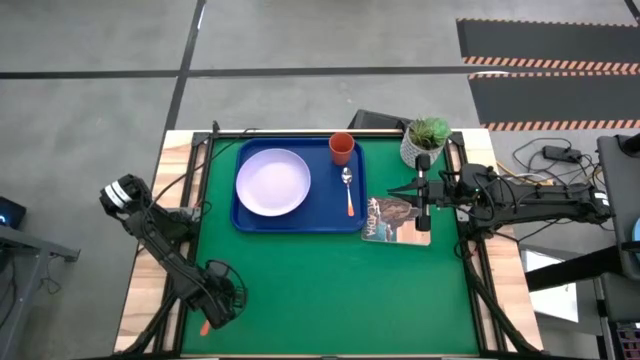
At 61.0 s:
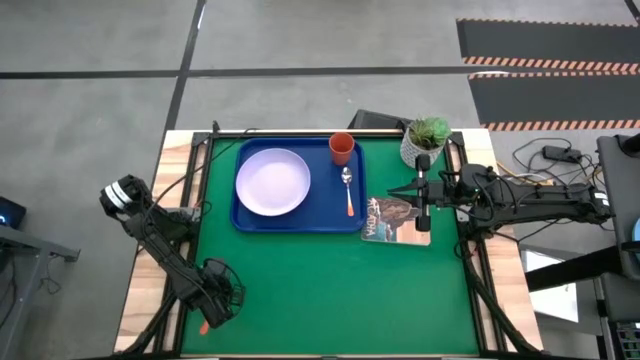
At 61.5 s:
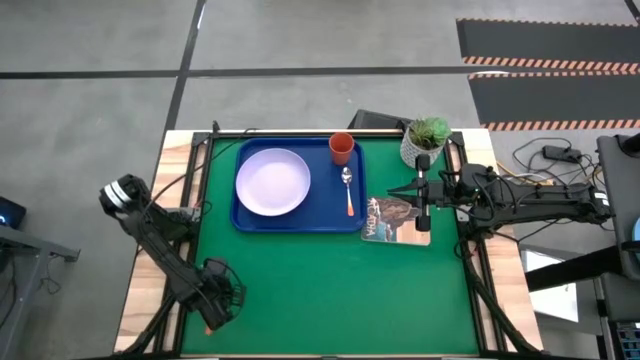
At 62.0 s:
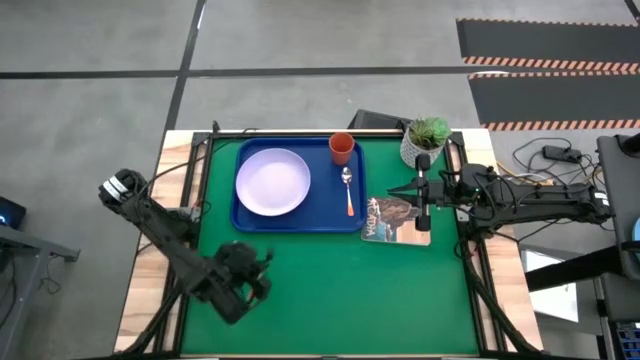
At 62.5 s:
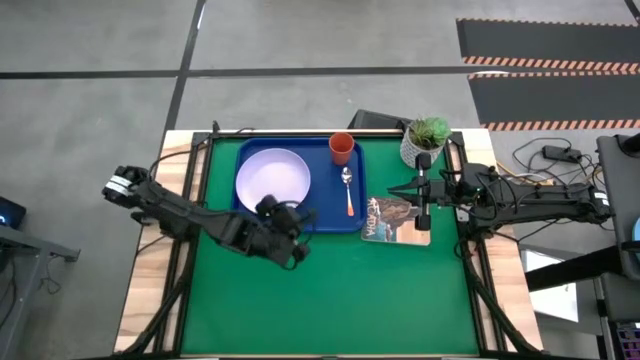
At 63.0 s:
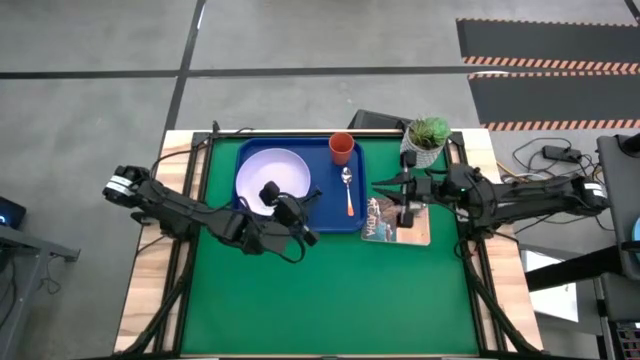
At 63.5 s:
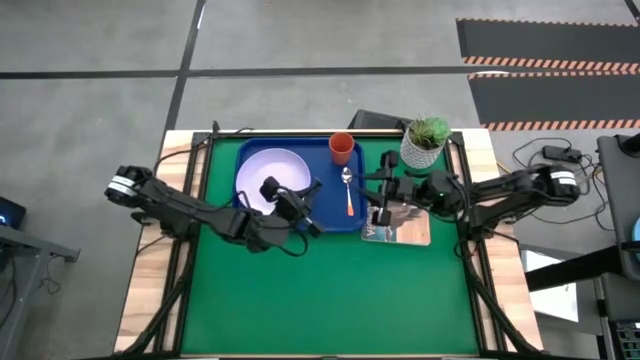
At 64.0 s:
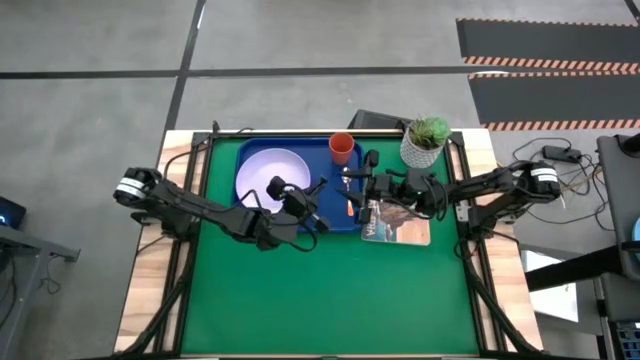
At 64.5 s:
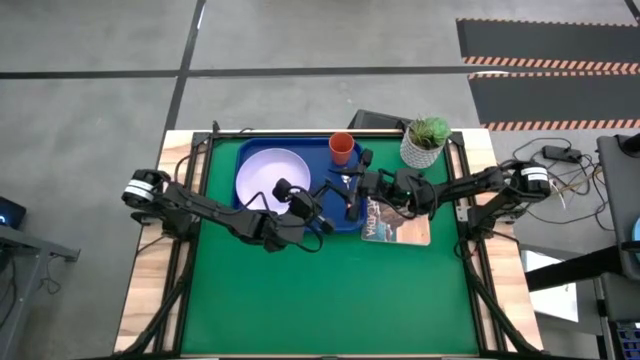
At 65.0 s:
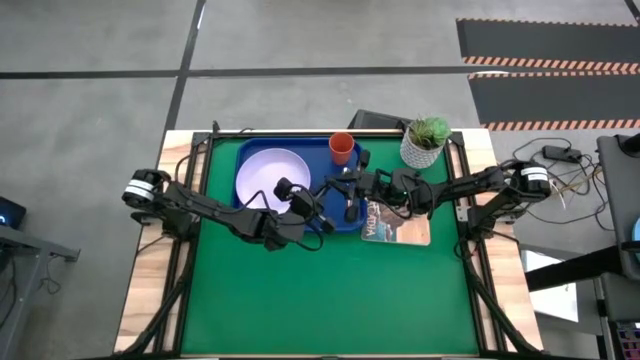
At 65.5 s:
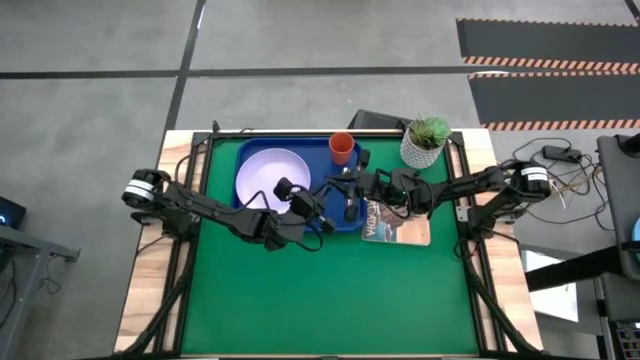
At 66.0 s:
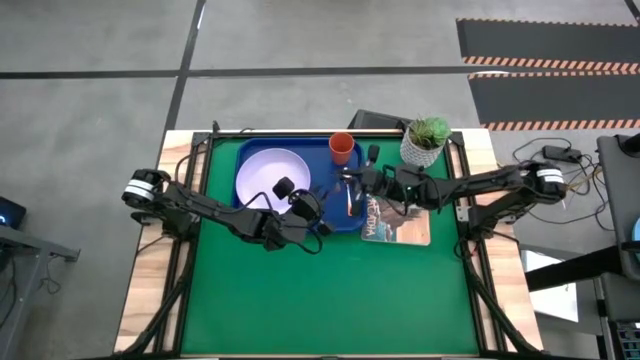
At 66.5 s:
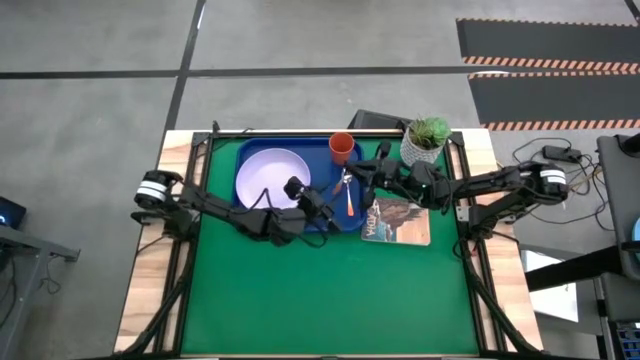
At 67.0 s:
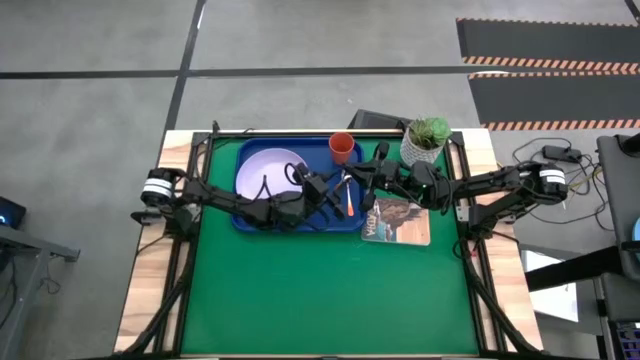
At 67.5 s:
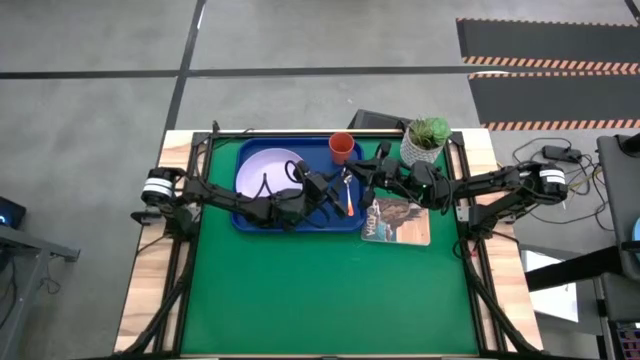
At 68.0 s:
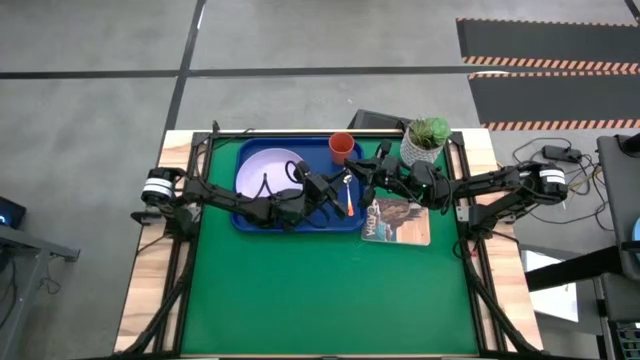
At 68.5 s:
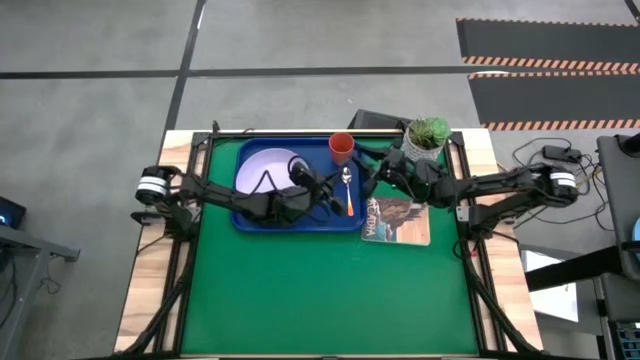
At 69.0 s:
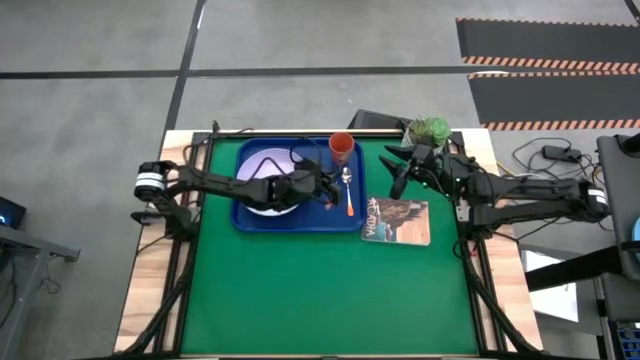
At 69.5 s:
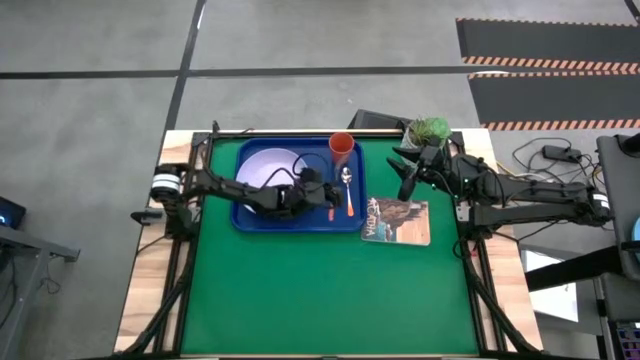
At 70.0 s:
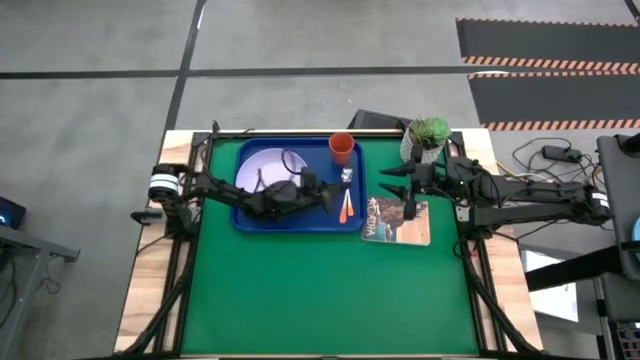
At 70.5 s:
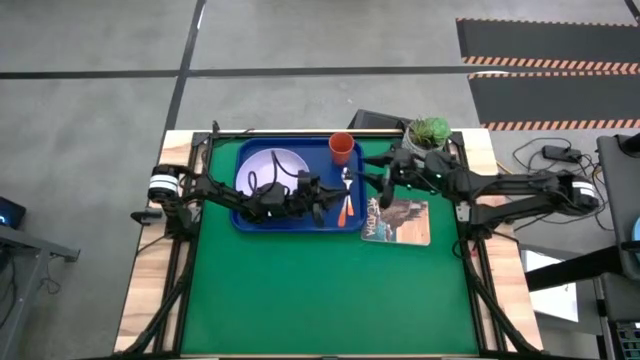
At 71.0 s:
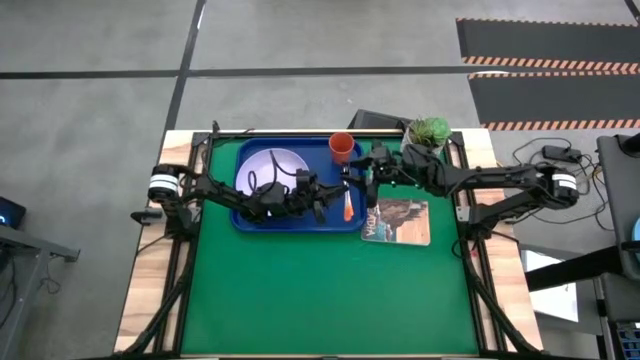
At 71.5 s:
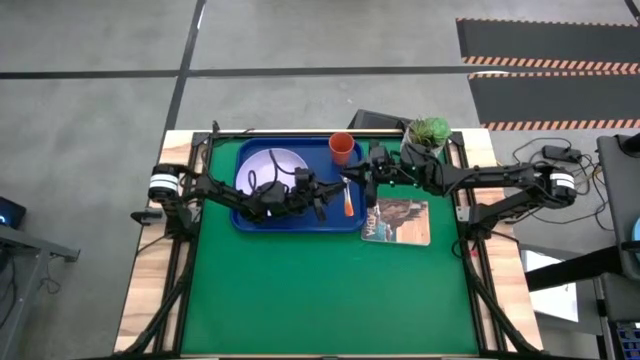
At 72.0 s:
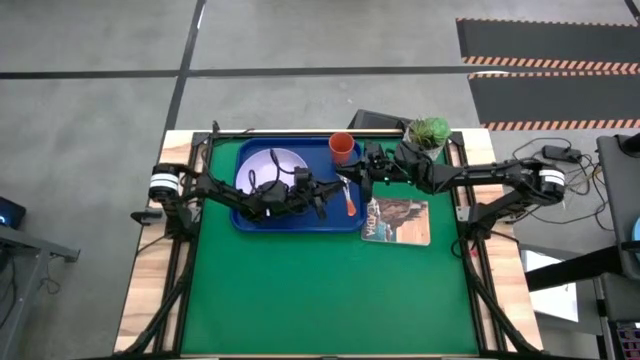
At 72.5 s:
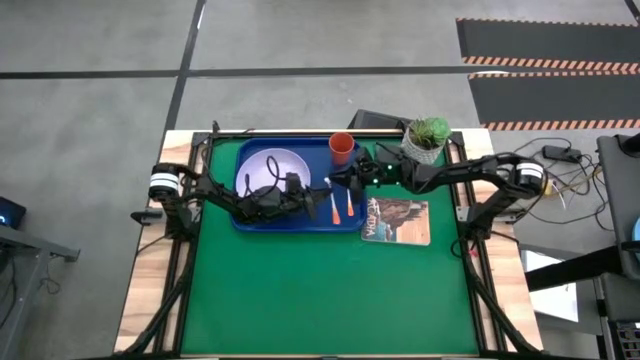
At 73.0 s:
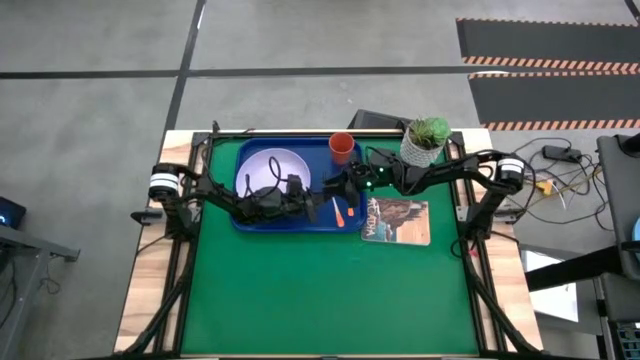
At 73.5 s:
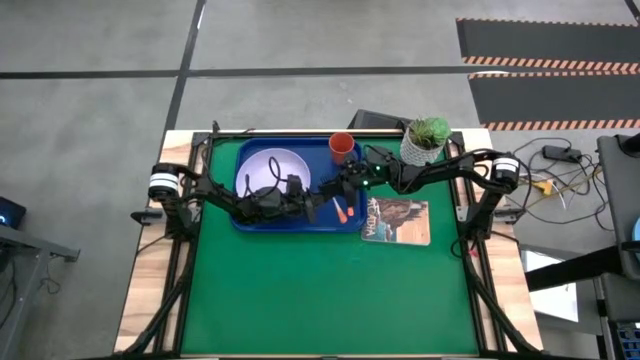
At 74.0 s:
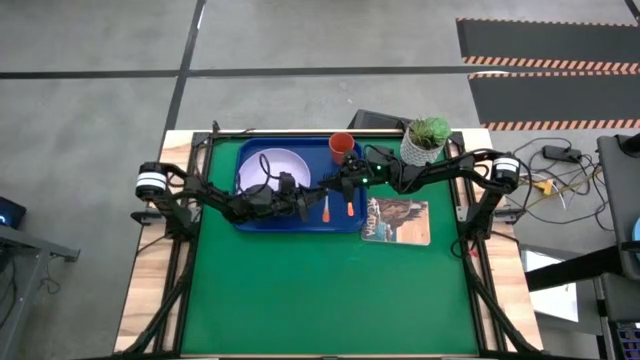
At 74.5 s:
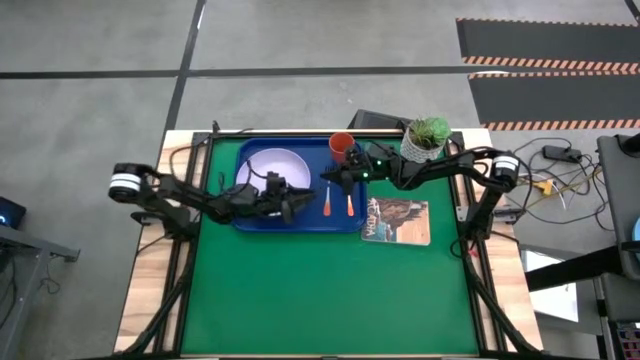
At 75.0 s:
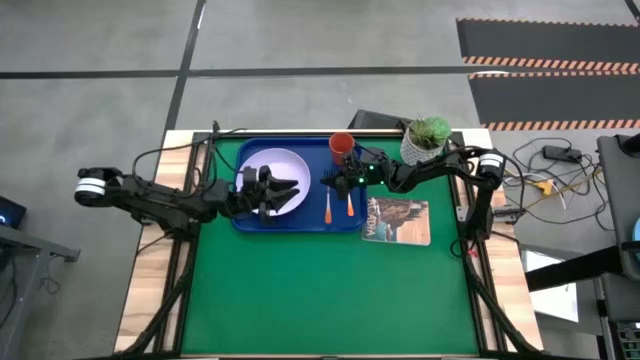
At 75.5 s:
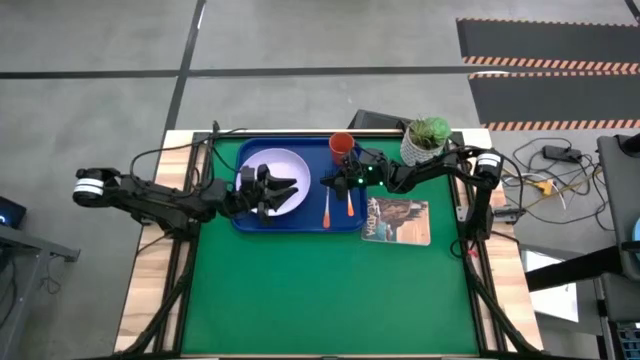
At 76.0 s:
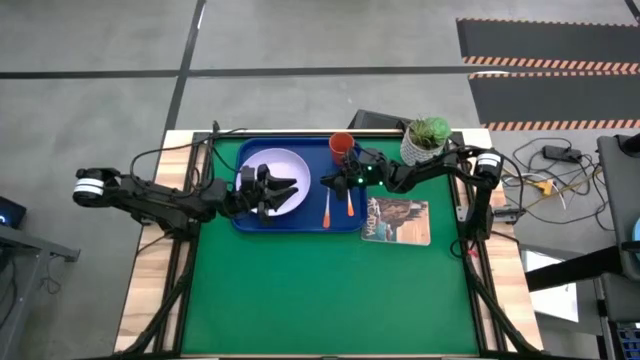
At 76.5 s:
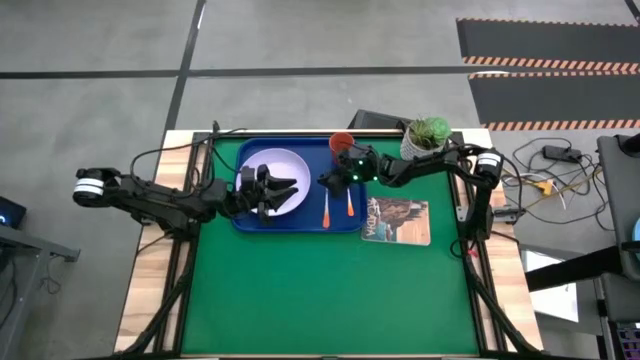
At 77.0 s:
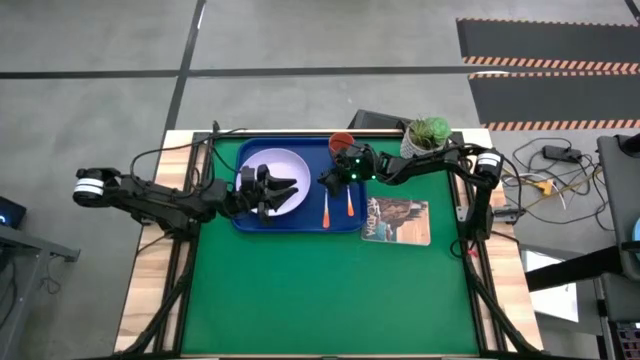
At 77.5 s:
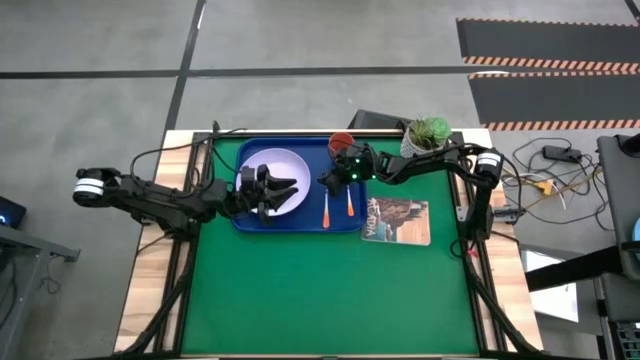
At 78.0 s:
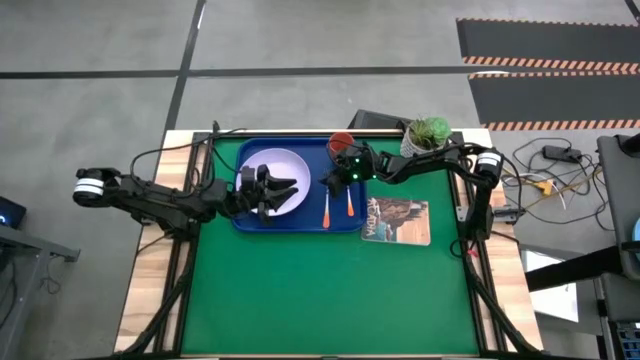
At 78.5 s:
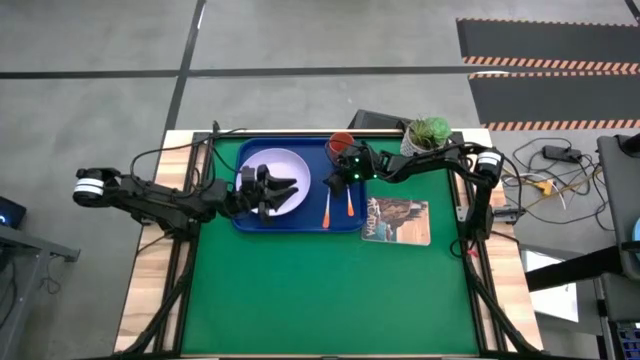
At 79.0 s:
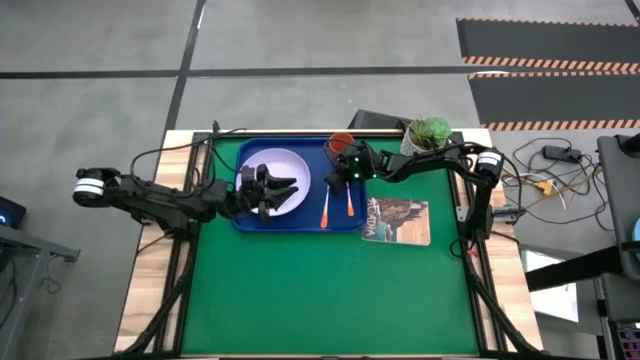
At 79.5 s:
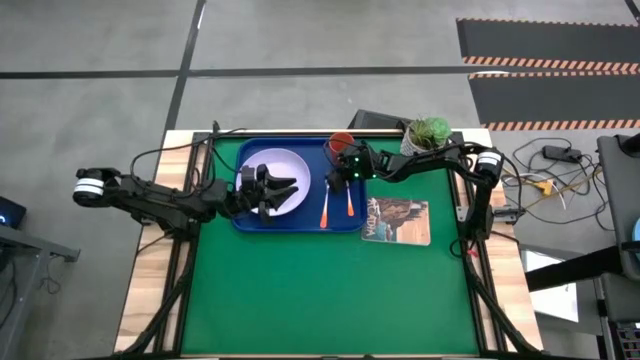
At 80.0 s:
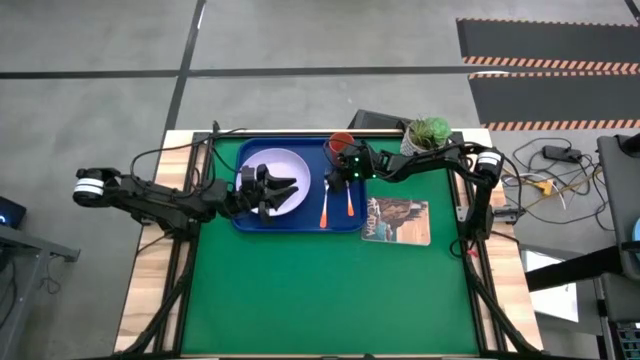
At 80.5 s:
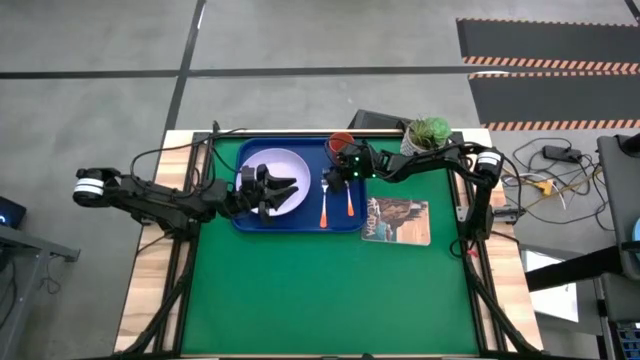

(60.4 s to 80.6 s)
Task: Pick and place plate/cup/fork/spoon on tray
Put the orange fork on the blue serving tray to the left of the orange spoon
